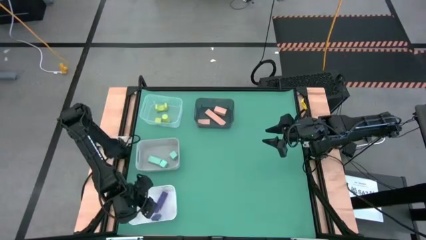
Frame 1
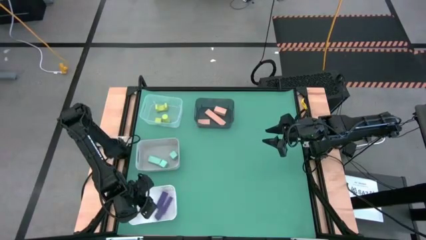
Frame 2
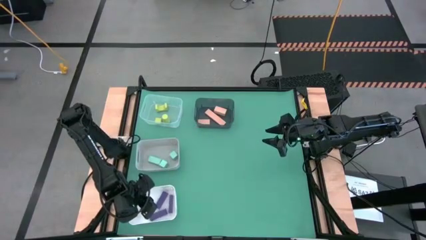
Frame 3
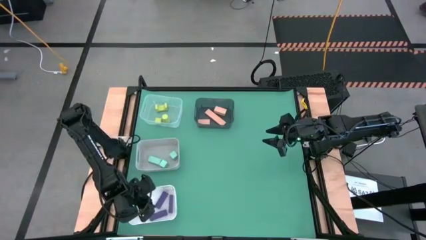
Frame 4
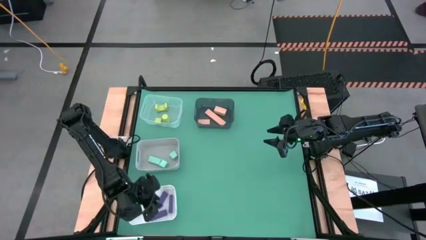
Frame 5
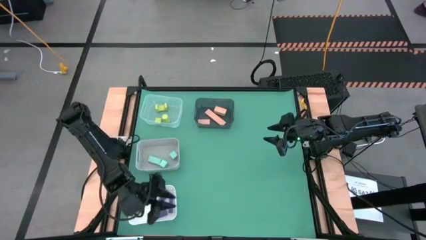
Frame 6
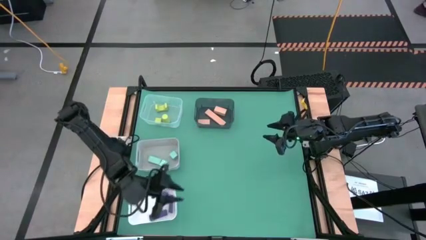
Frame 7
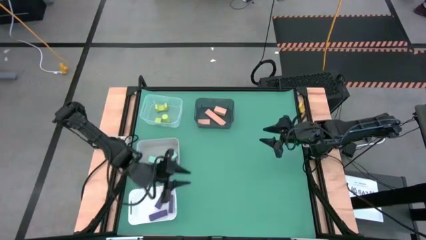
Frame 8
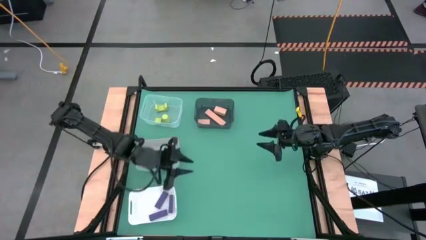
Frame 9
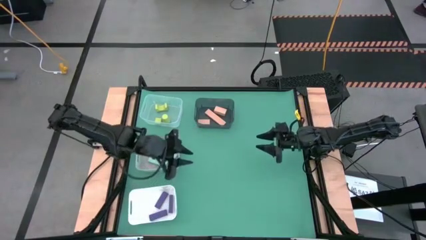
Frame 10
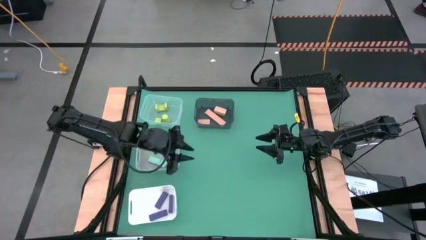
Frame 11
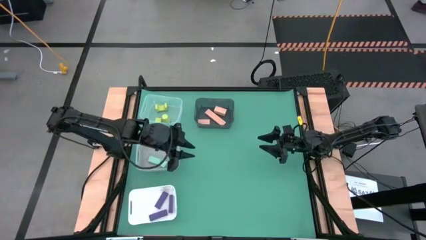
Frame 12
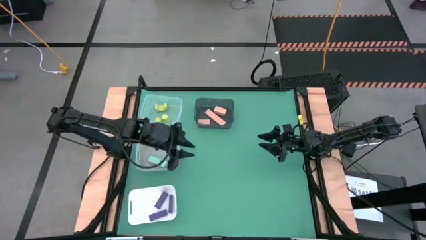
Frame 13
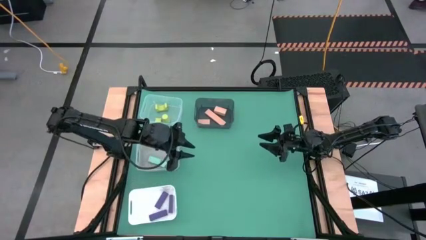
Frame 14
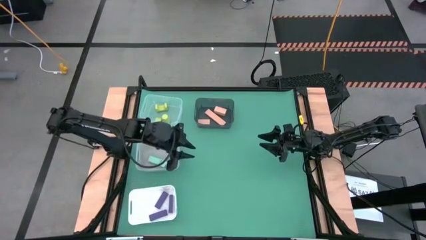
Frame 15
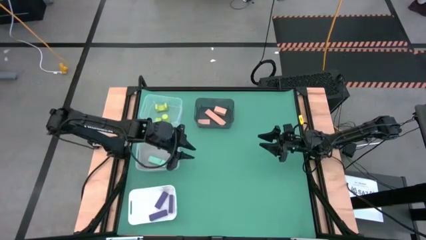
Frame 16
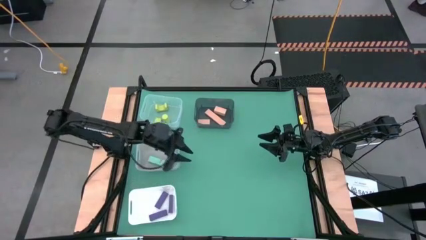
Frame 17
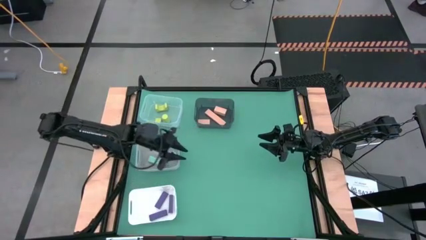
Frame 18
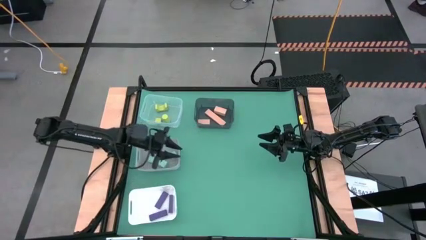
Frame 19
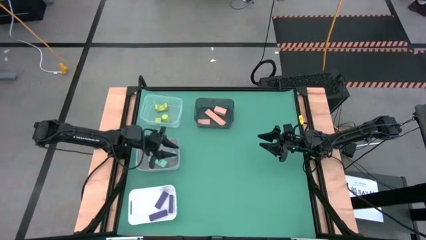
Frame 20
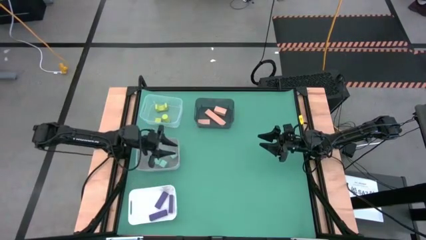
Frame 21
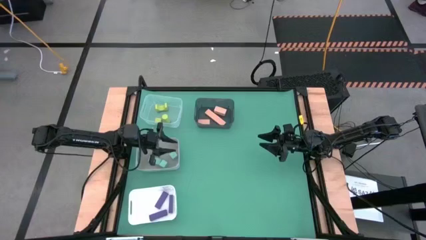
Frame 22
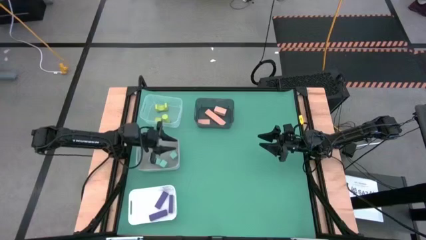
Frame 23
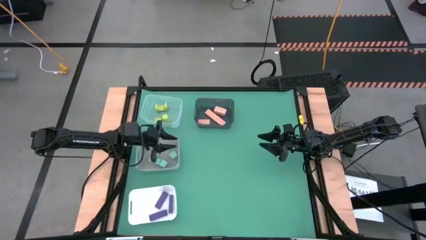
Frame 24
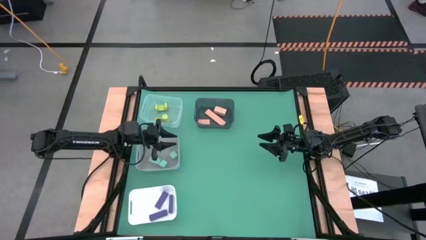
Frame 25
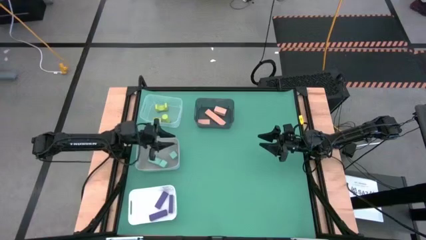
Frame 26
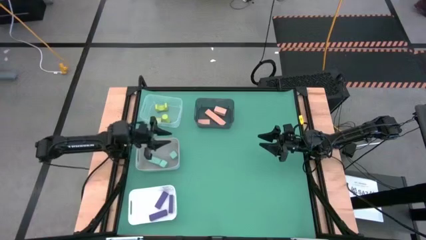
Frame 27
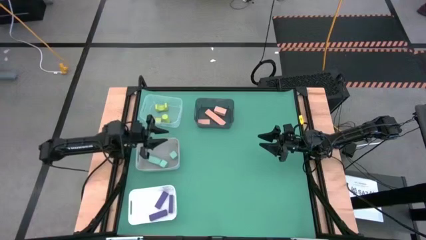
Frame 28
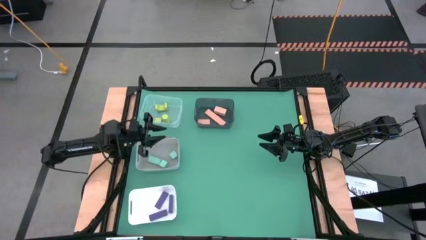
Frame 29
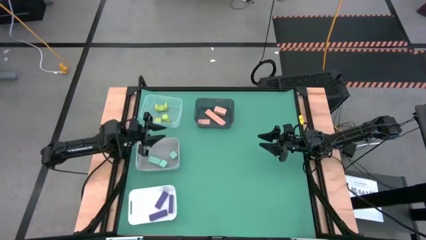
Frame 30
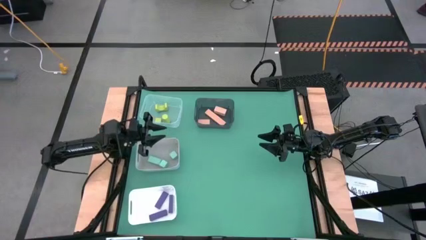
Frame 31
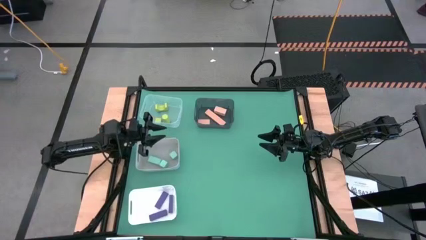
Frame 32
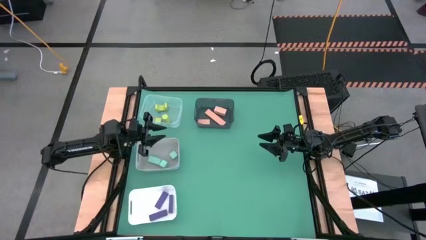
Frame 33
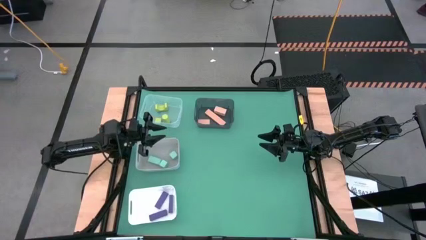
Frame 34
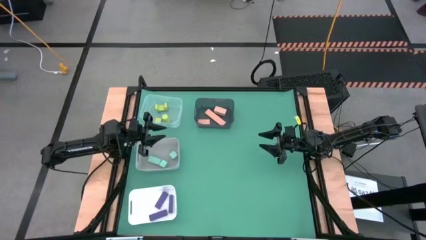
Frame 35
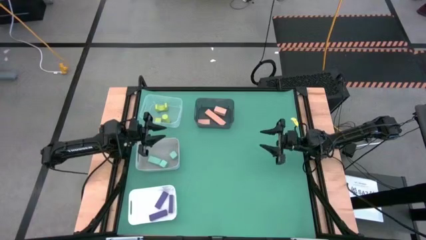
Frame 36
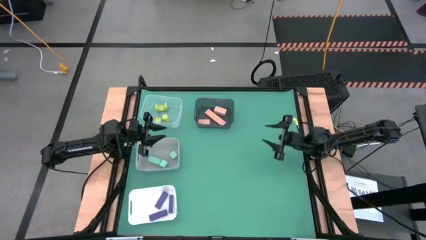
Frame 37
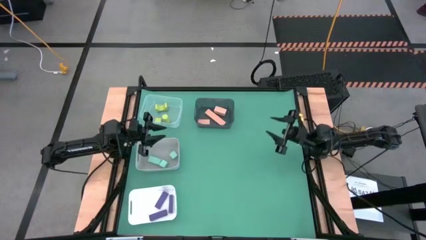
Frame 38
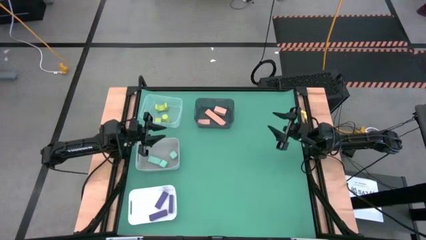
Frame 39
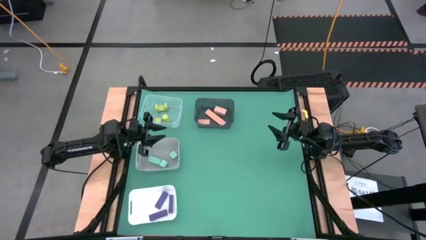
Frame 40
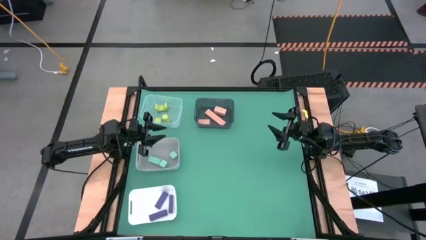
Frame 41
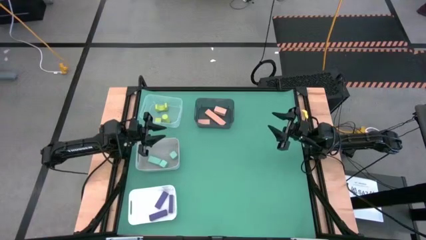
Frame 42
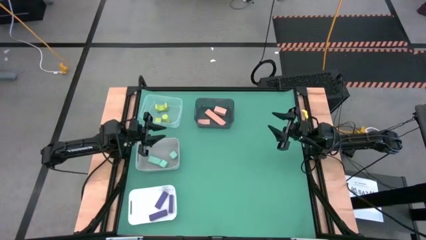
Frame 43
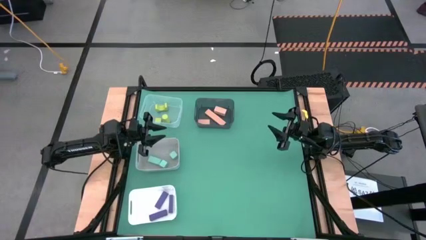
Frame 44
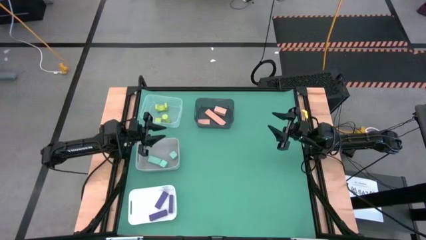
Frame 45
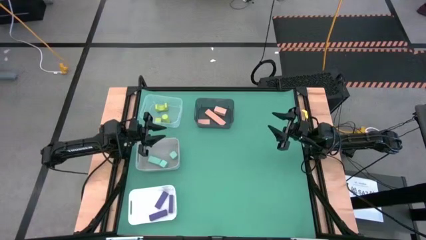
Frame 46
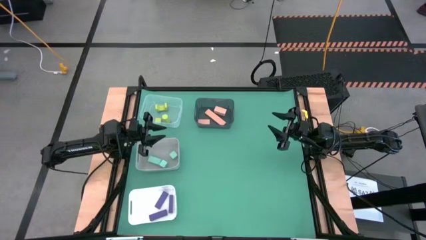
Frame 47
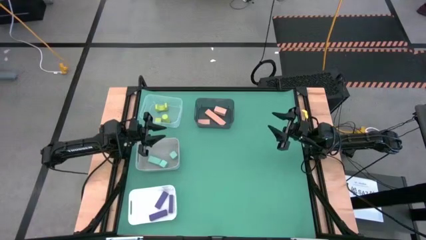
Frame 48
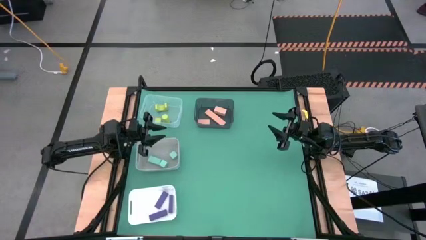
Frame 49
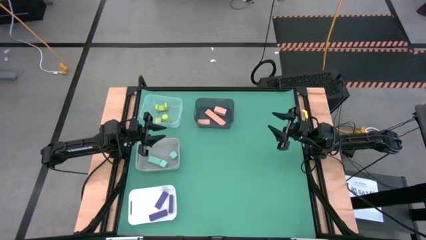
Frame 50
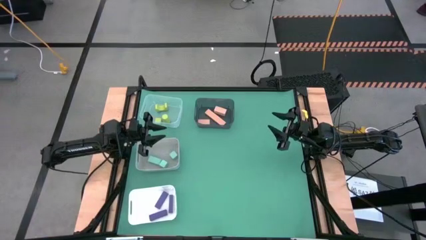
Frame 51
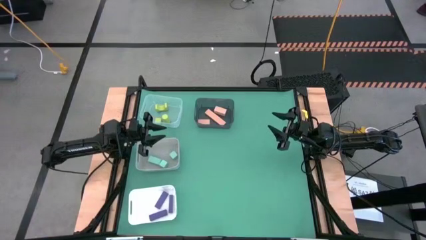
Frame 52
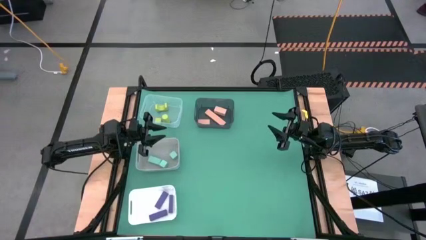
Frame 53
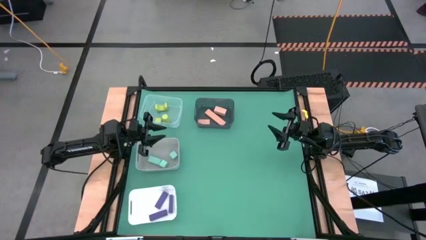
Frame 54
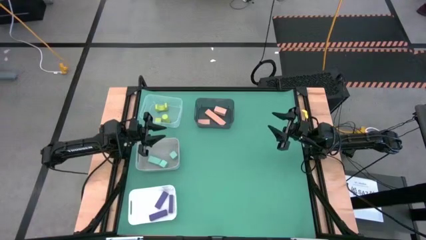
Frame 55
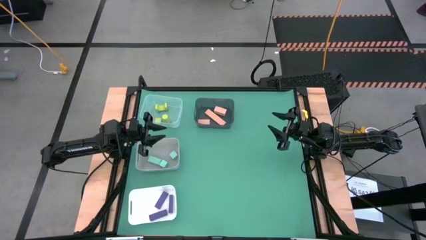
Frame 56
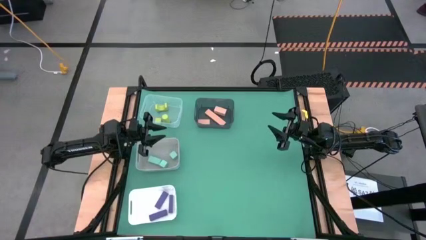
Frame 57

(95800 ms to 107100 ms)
Task: Sort & place blocks by color
Return to Home Position
